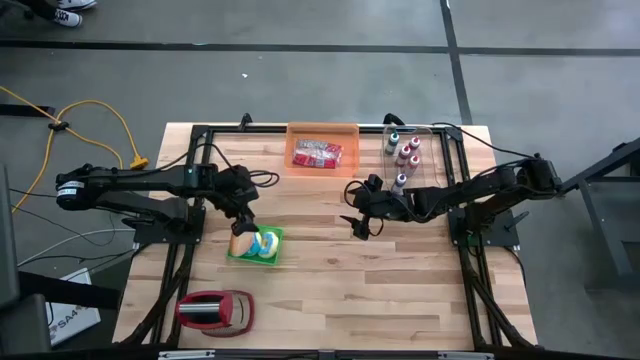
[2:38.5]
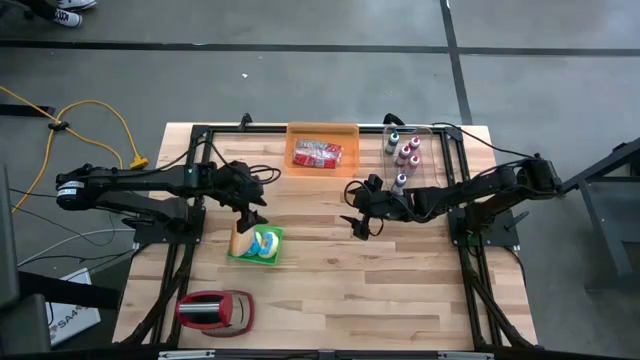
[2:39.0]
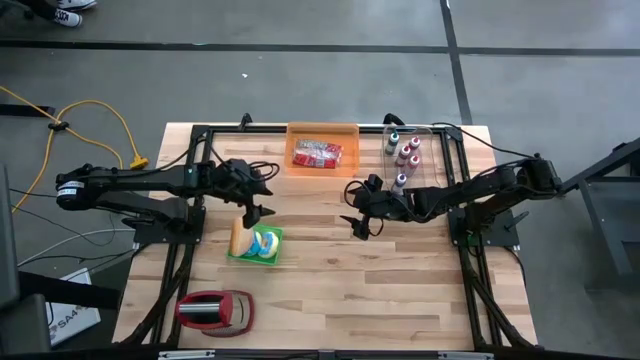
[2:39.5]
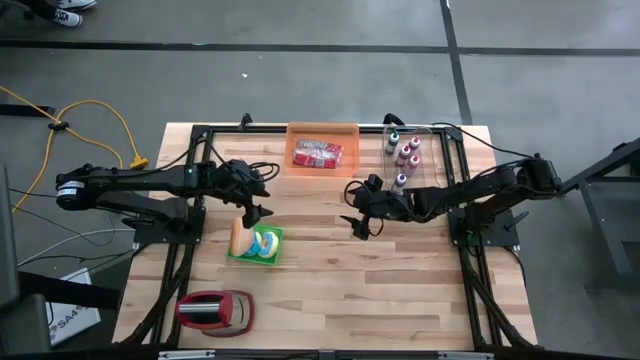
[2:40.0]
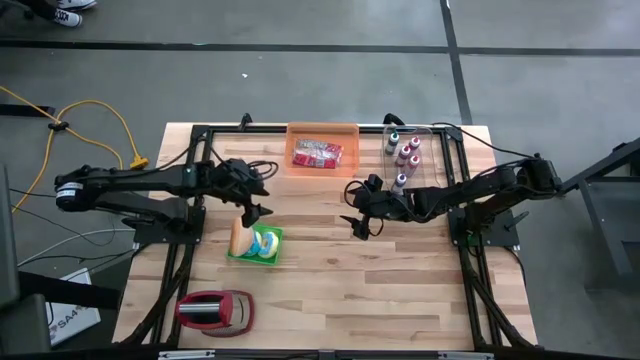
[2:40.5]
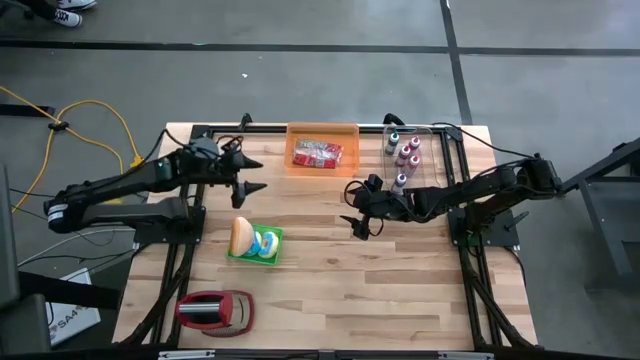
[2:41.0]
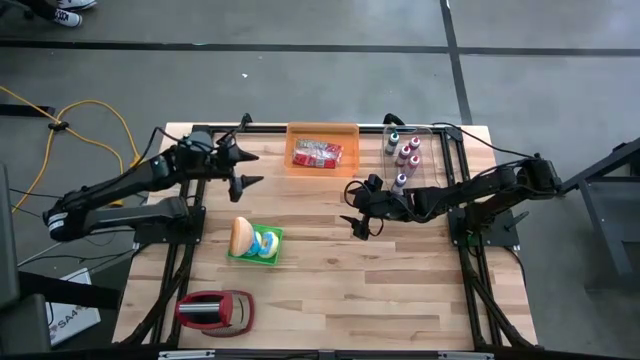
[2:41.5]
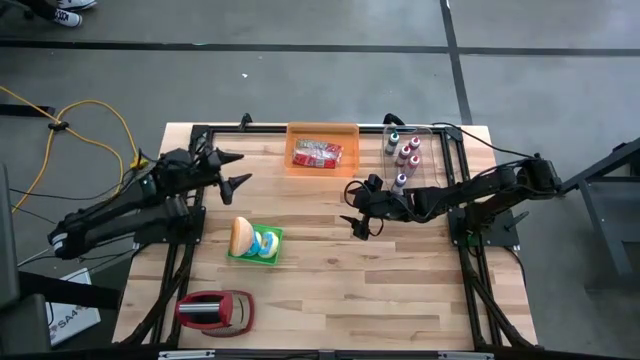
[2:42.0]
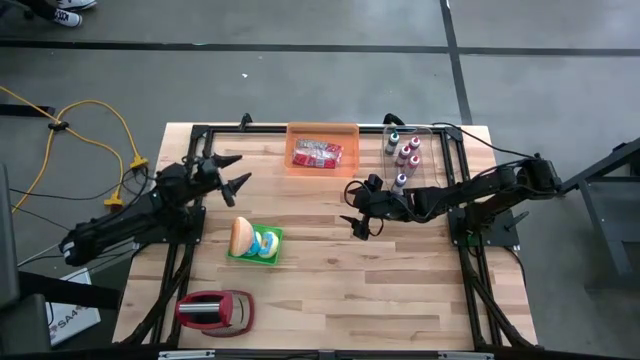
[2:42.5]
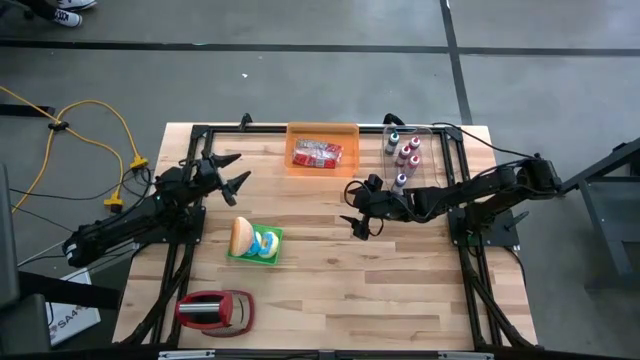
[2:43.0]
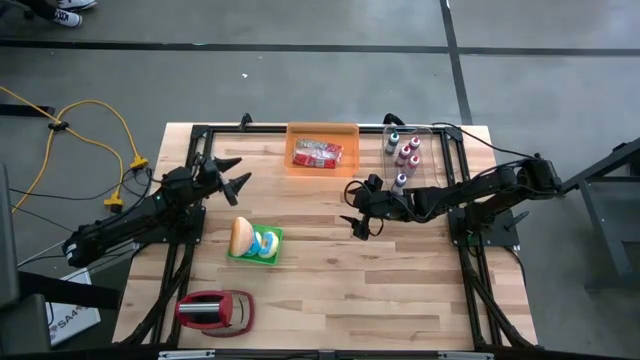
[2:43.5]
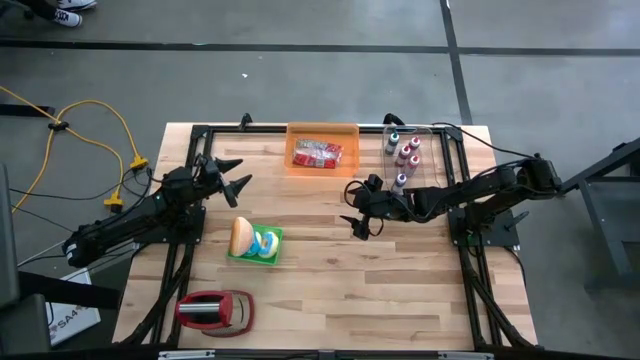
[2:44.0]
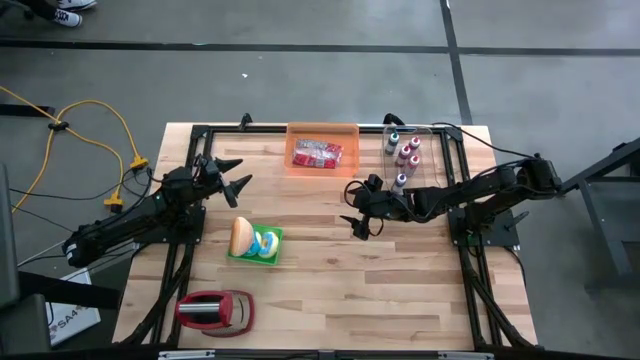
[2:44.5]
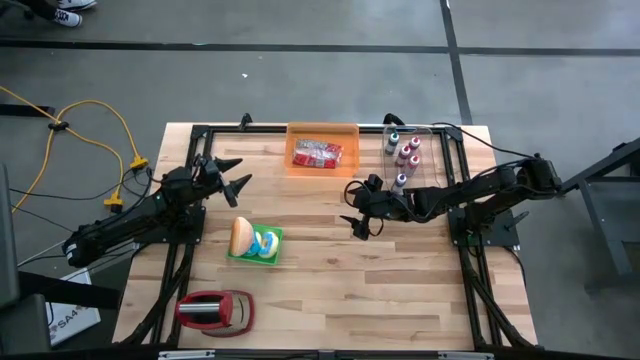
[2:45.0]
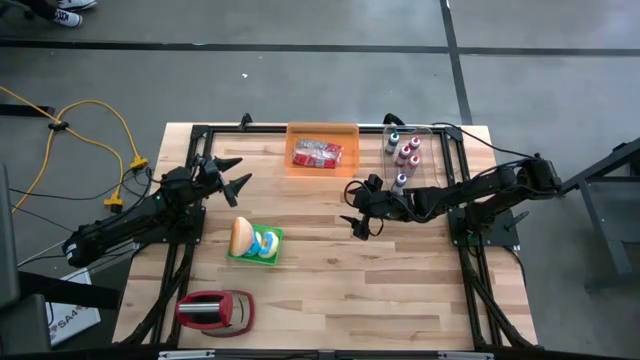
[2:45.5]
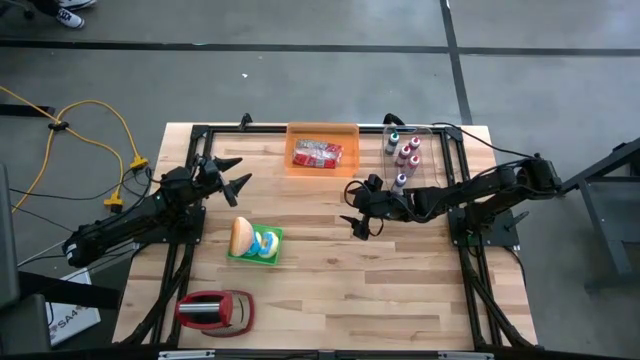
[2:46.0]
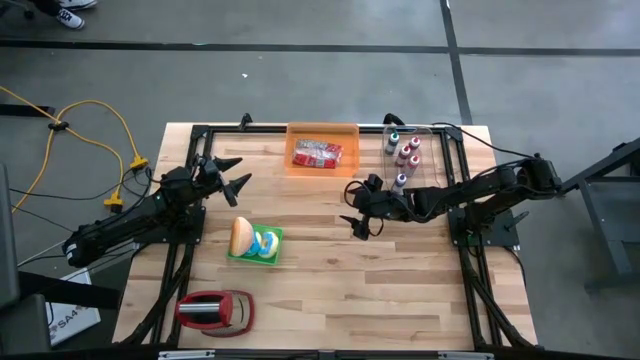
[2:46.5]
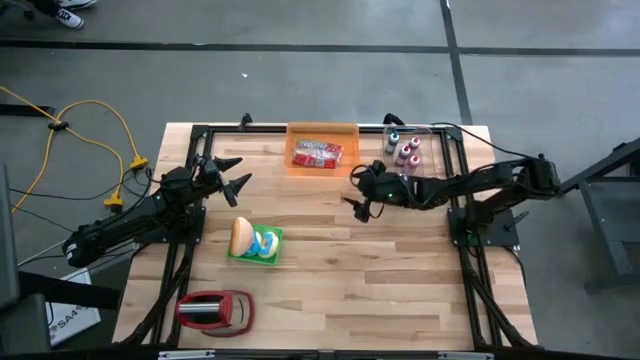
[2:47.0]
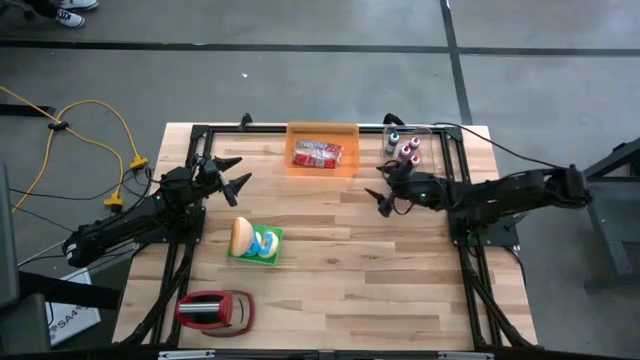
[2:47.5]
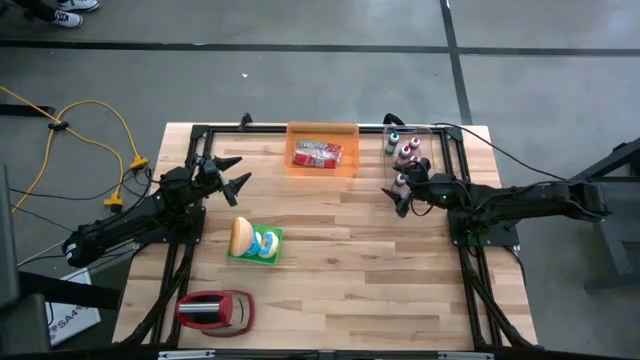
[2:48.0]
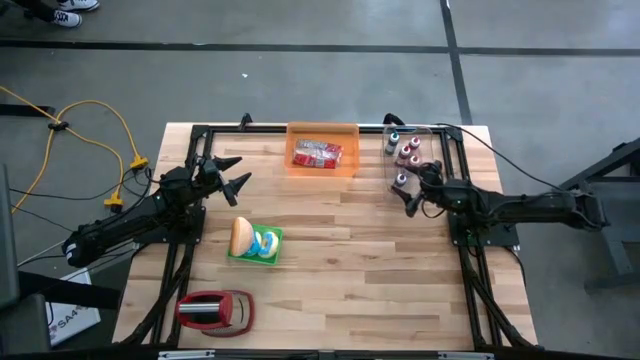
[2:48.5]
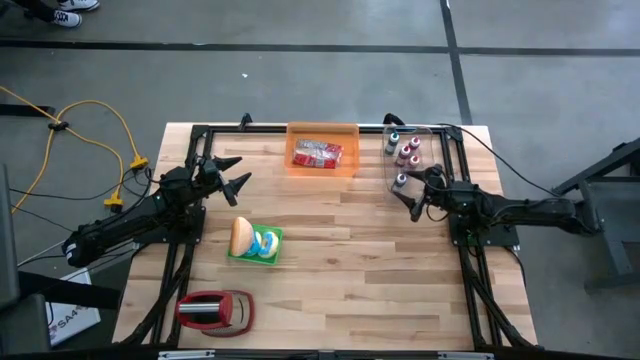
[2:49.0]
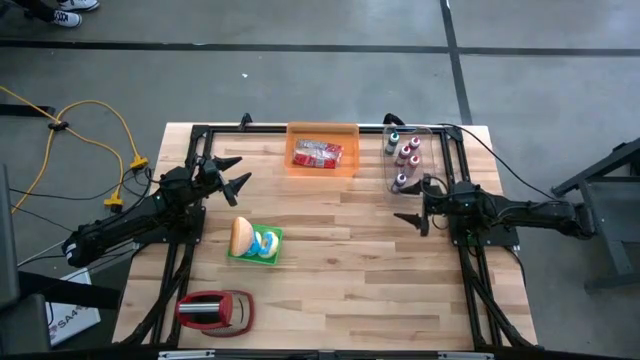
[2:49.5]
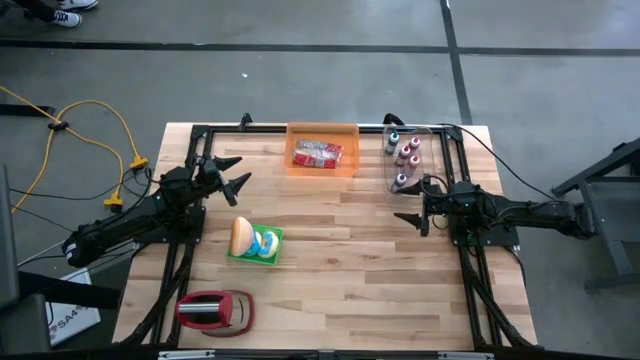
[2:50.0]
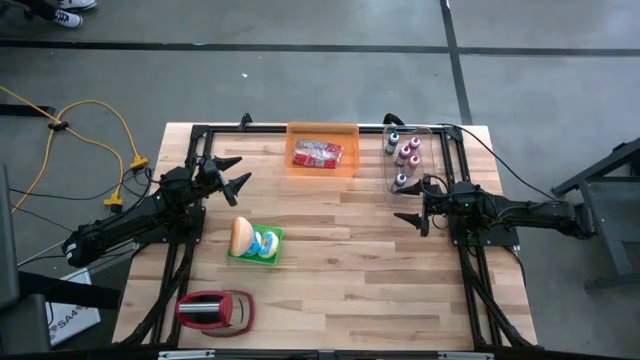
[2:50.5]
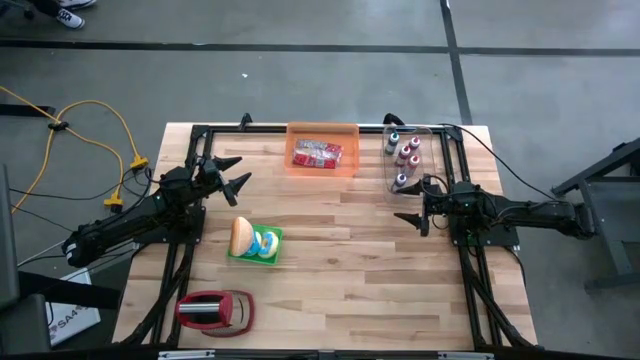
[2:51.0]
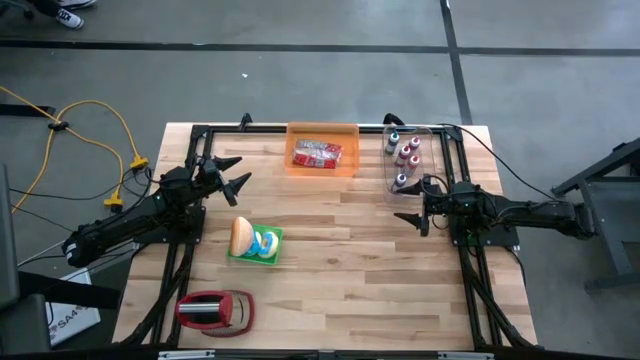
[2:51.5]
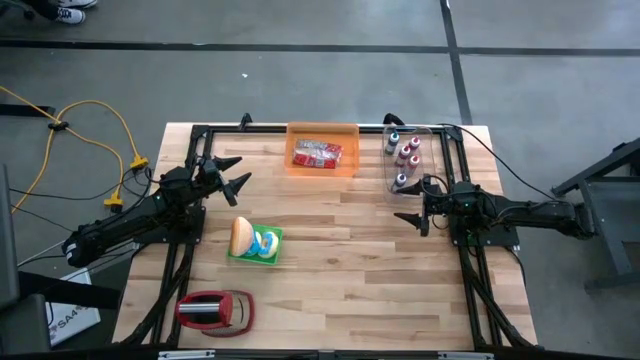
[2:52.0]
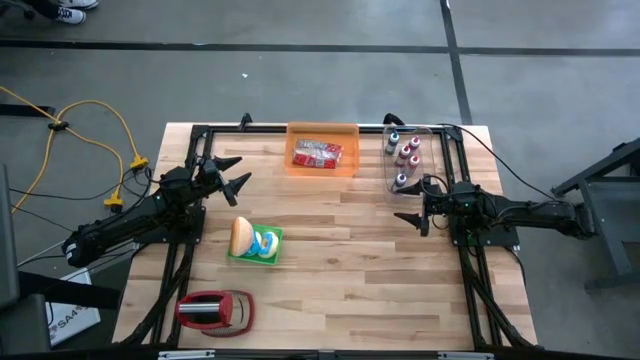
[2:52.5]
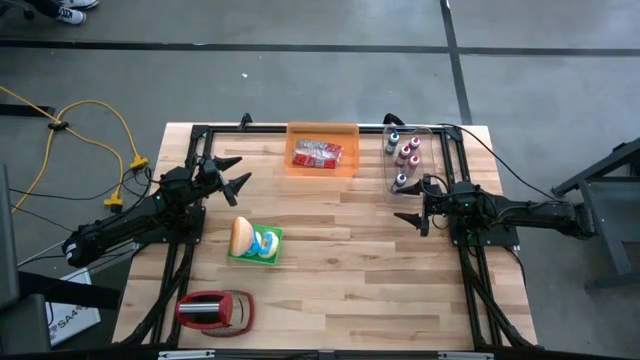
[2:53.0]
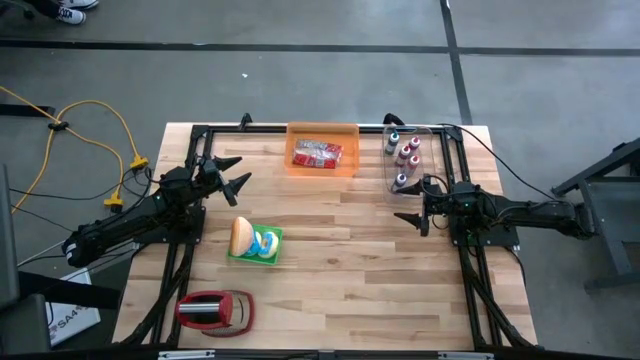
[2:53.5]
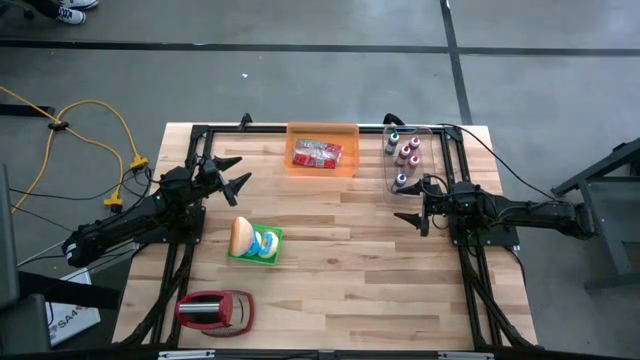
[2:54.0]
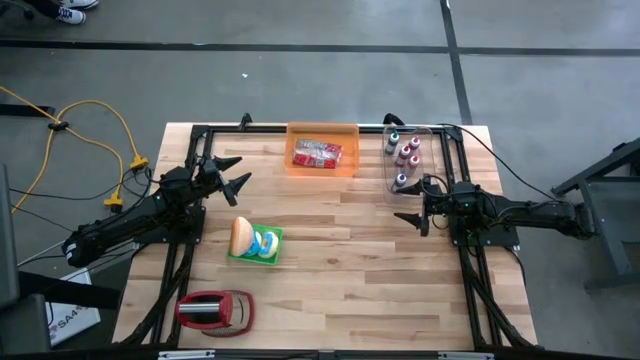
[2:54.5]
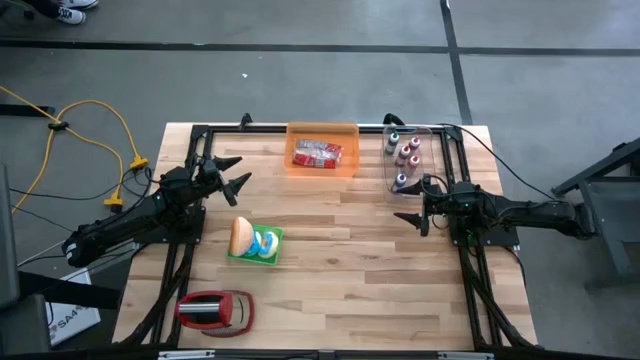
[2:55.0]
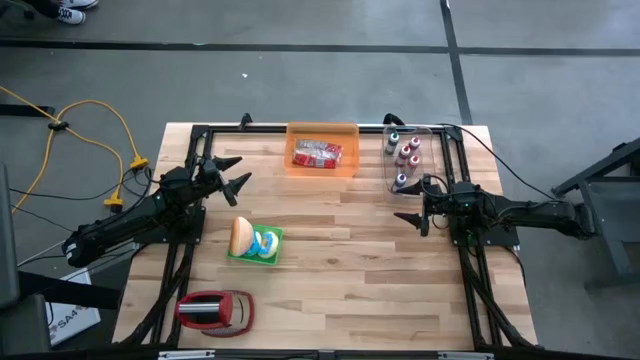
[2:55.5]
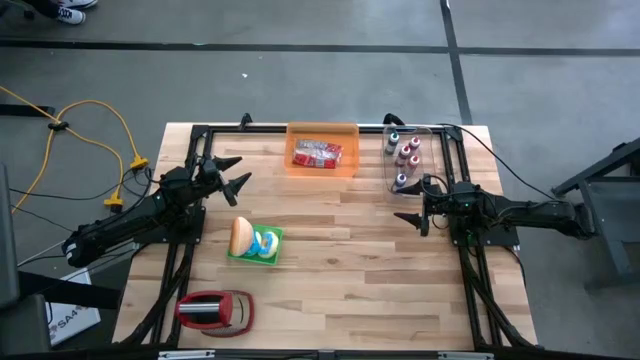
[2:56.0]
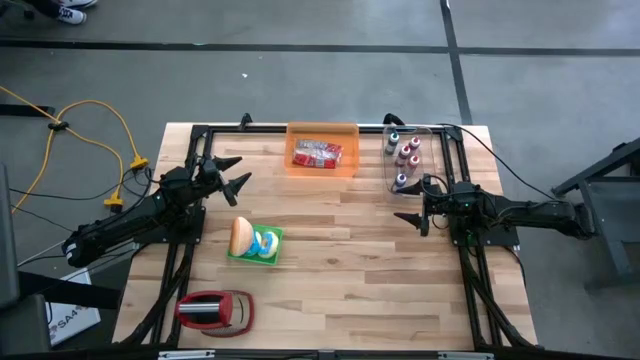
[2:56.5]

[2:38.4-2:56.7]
Return to Home Position
